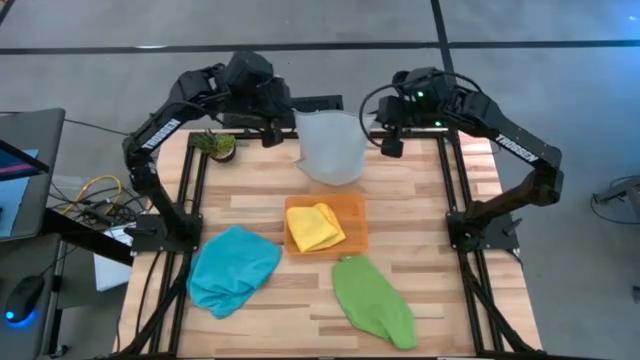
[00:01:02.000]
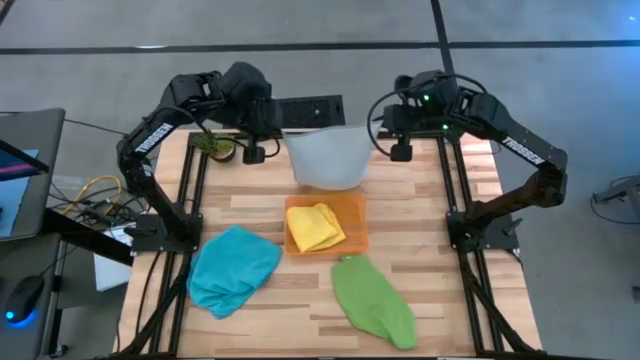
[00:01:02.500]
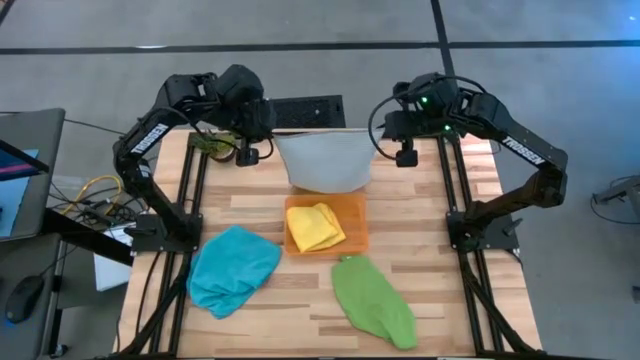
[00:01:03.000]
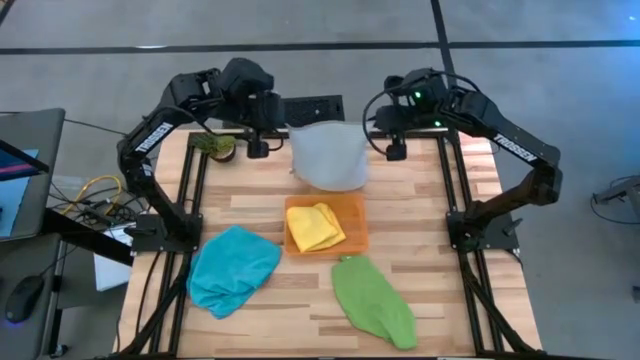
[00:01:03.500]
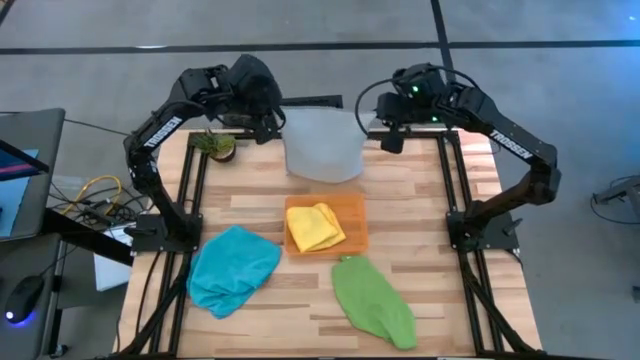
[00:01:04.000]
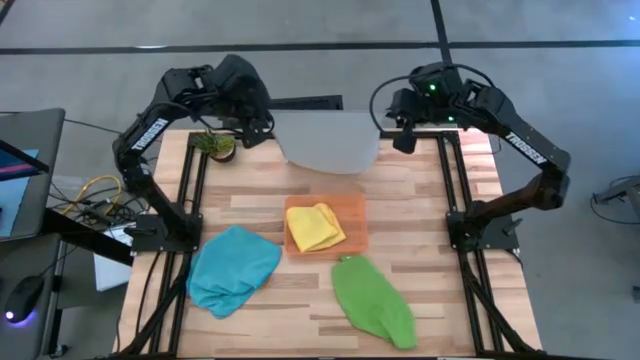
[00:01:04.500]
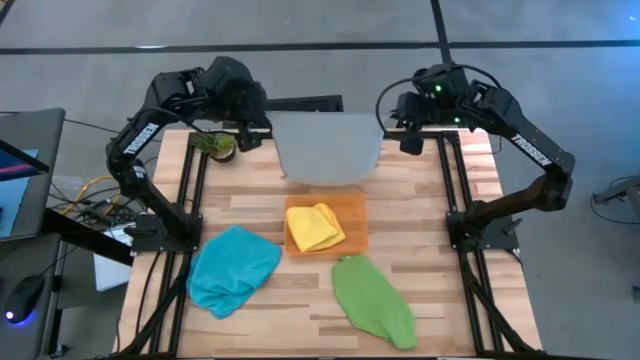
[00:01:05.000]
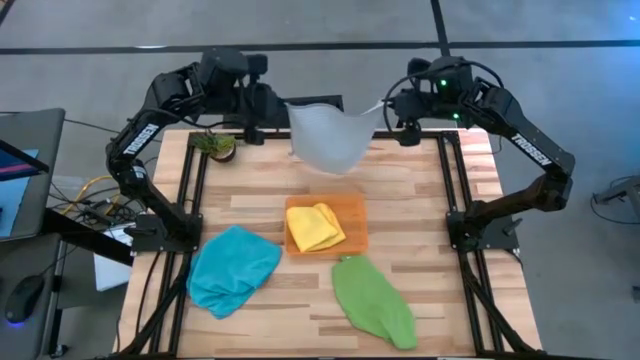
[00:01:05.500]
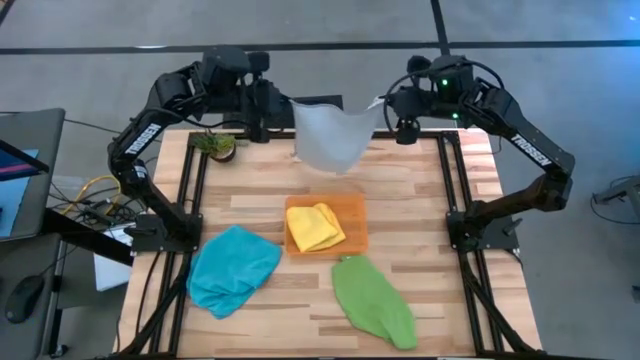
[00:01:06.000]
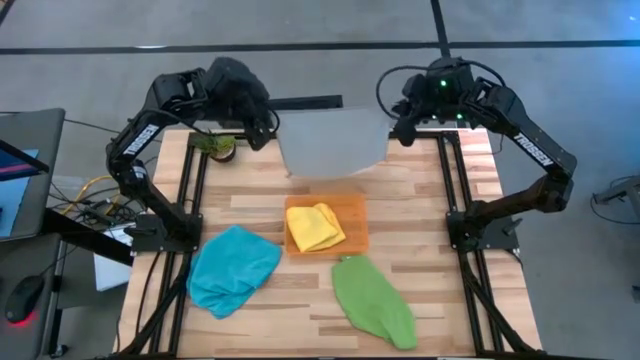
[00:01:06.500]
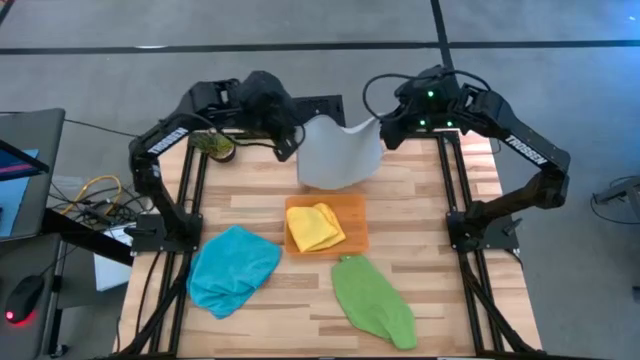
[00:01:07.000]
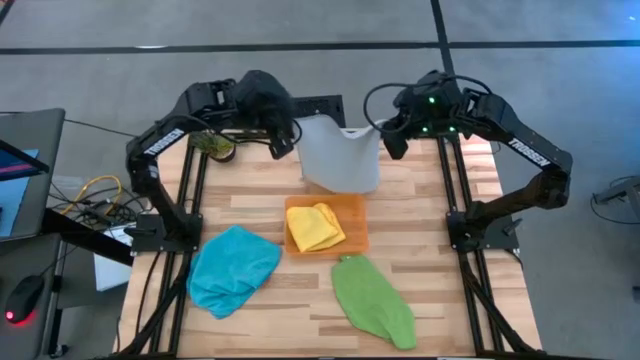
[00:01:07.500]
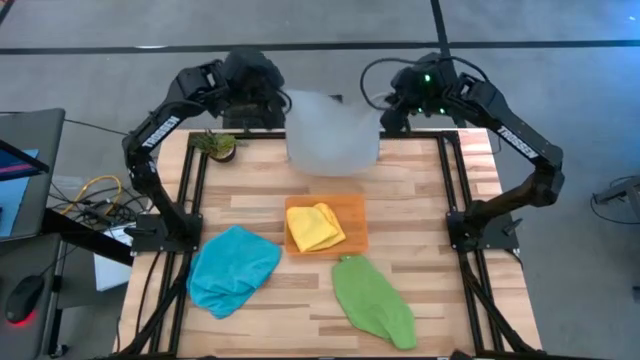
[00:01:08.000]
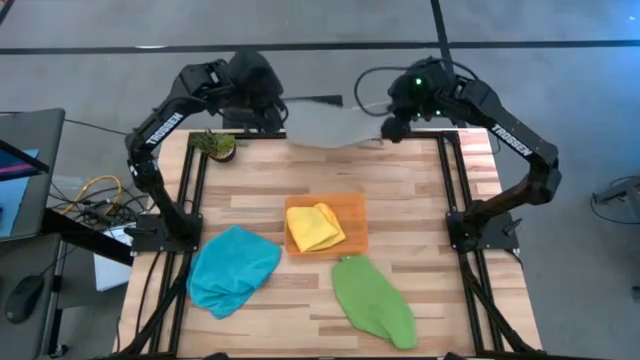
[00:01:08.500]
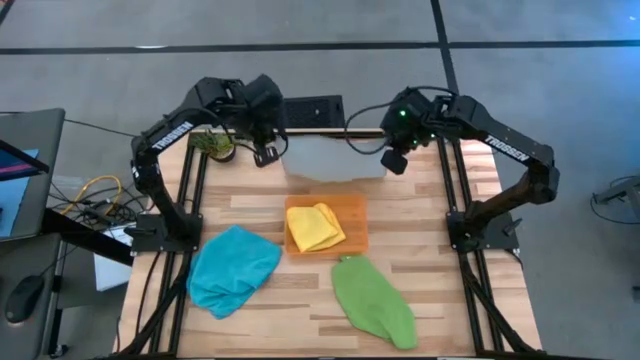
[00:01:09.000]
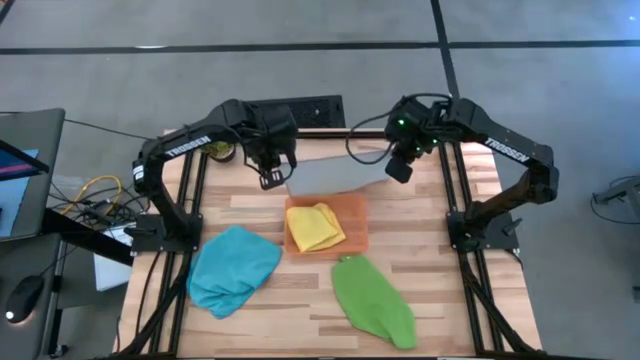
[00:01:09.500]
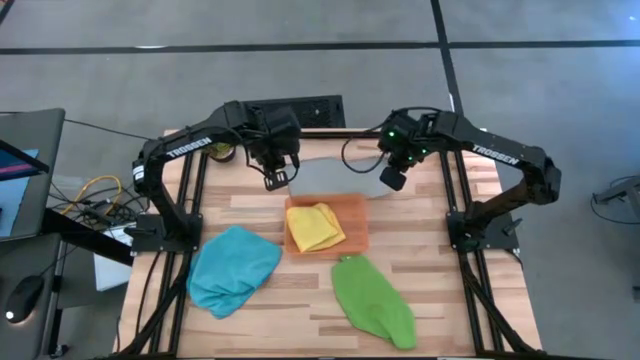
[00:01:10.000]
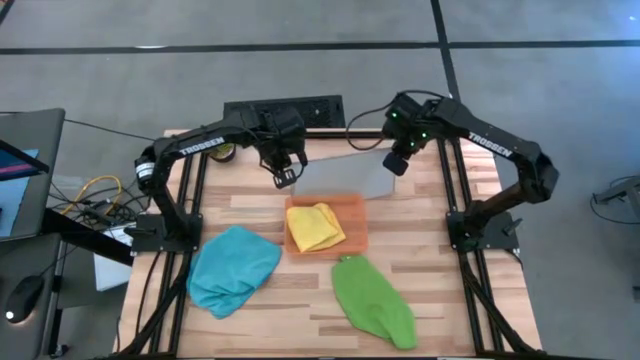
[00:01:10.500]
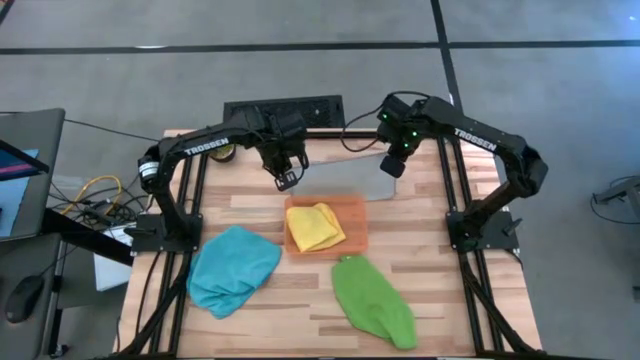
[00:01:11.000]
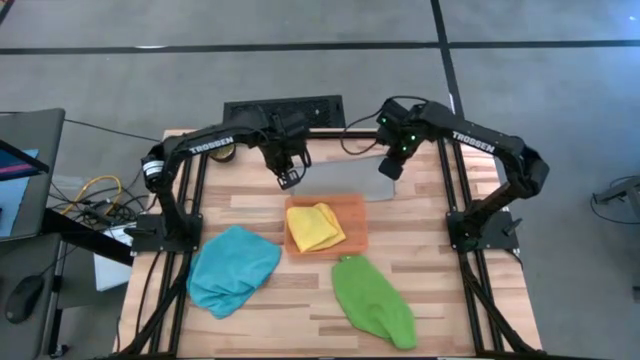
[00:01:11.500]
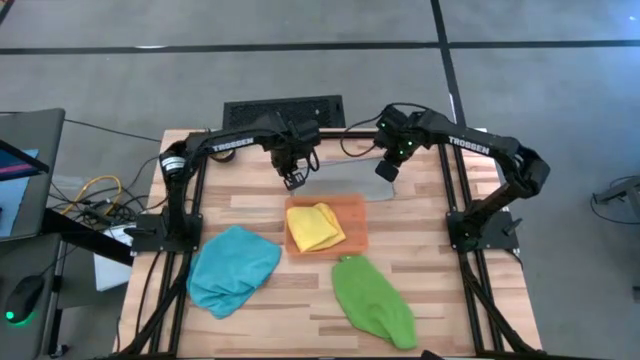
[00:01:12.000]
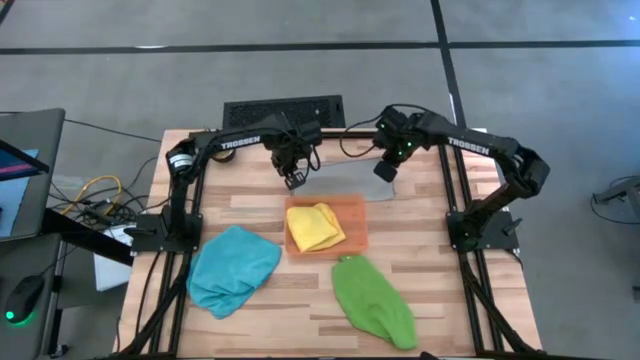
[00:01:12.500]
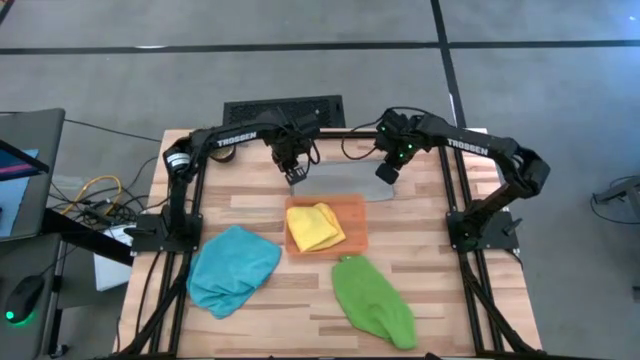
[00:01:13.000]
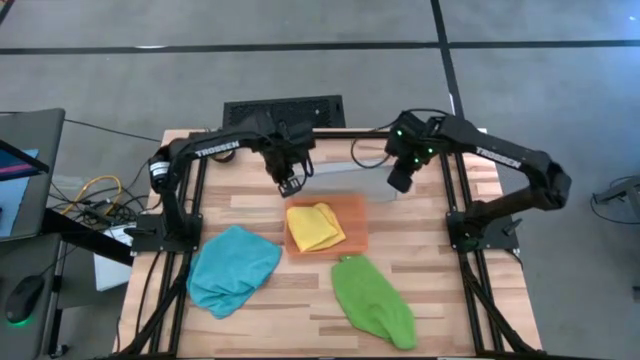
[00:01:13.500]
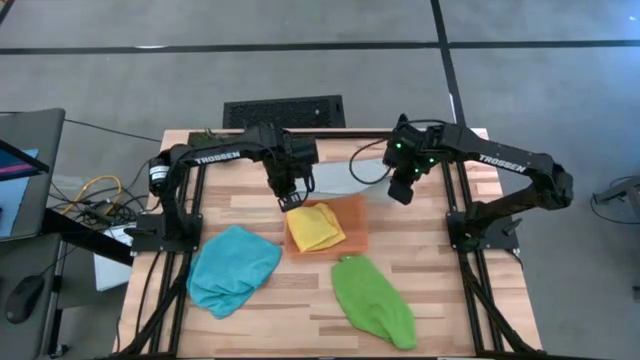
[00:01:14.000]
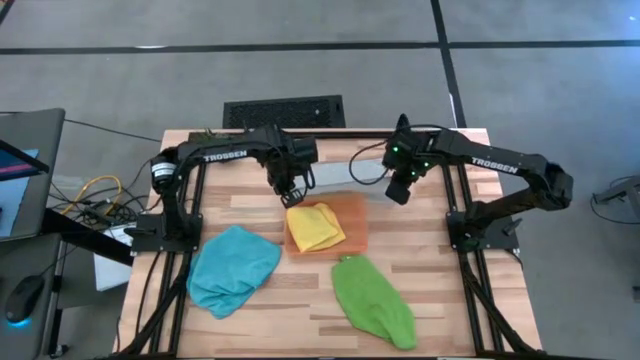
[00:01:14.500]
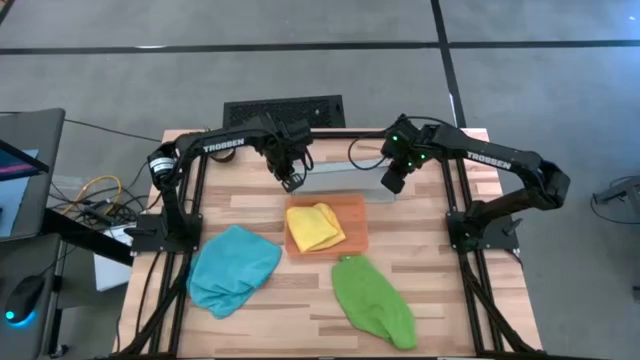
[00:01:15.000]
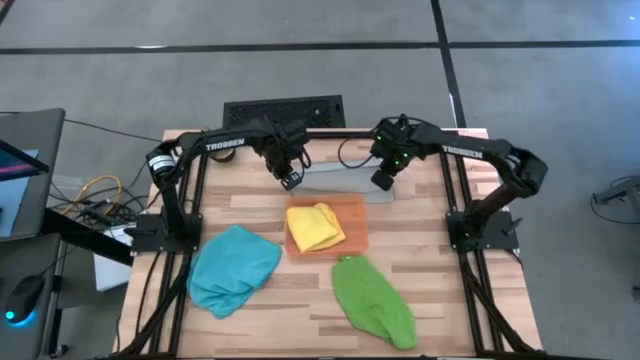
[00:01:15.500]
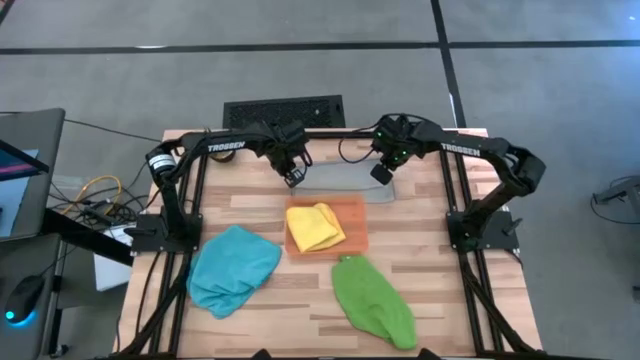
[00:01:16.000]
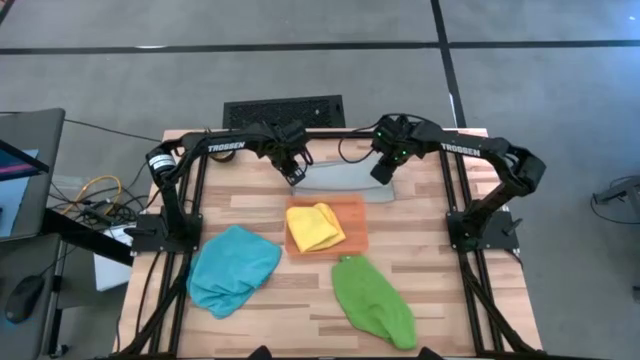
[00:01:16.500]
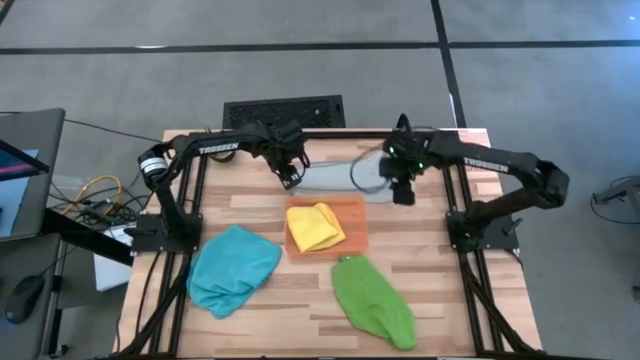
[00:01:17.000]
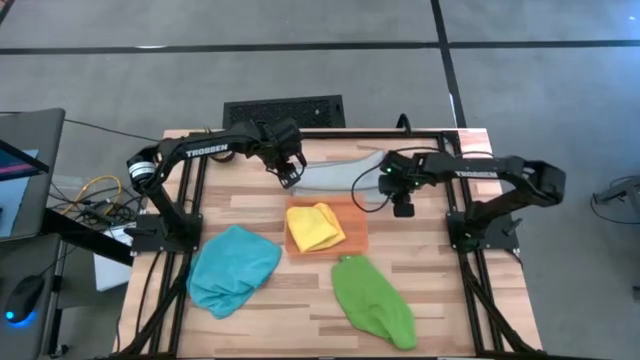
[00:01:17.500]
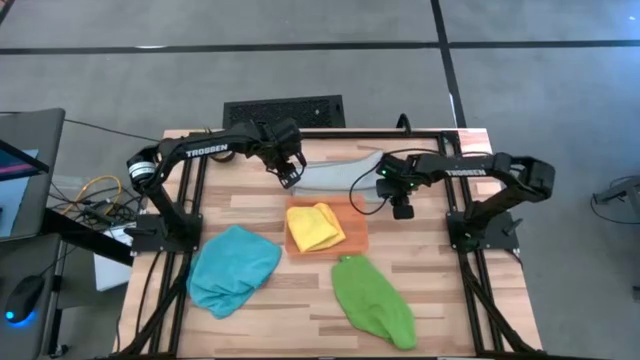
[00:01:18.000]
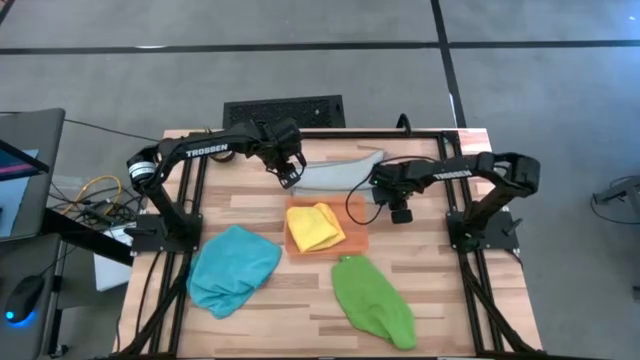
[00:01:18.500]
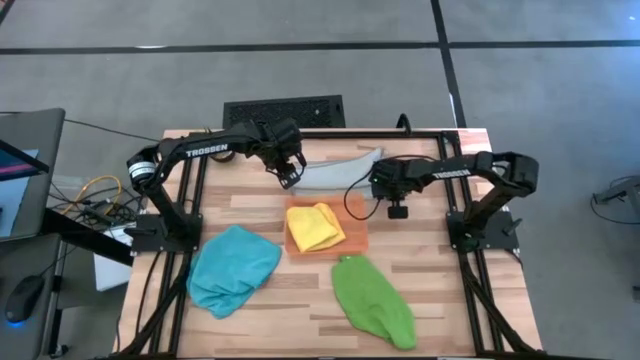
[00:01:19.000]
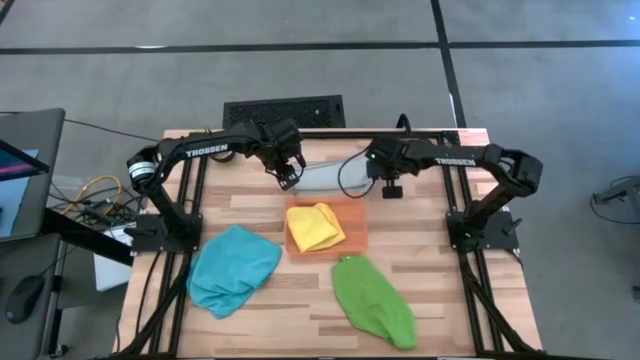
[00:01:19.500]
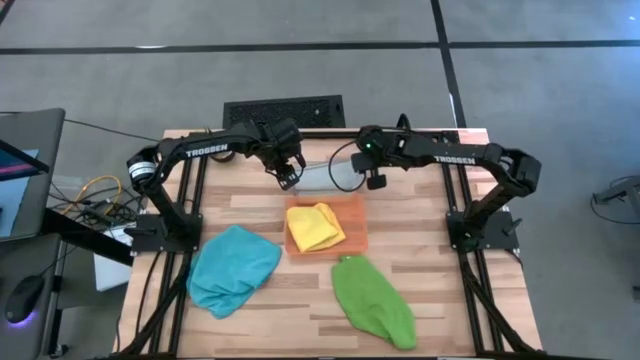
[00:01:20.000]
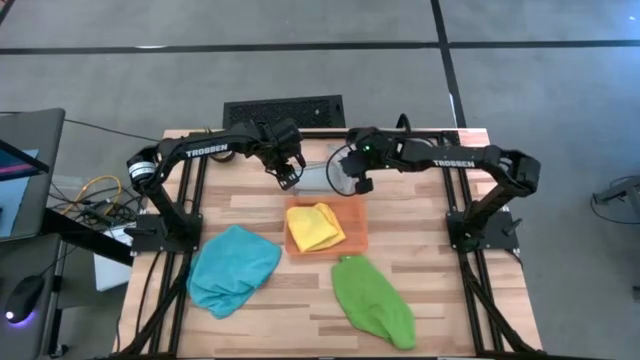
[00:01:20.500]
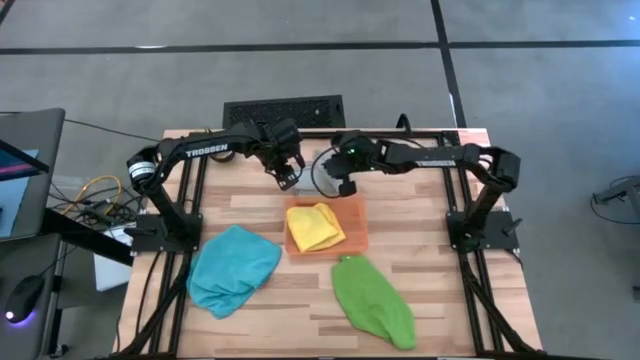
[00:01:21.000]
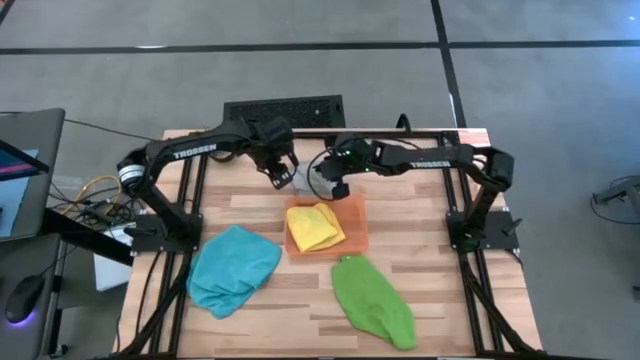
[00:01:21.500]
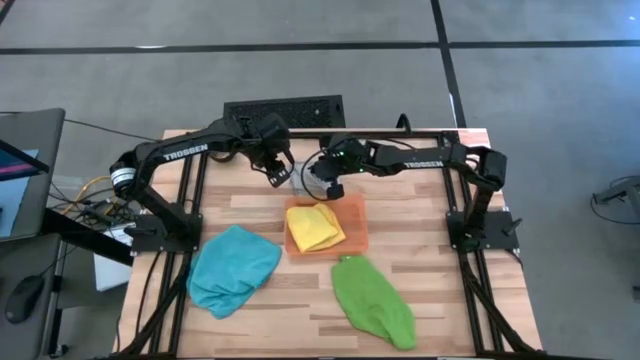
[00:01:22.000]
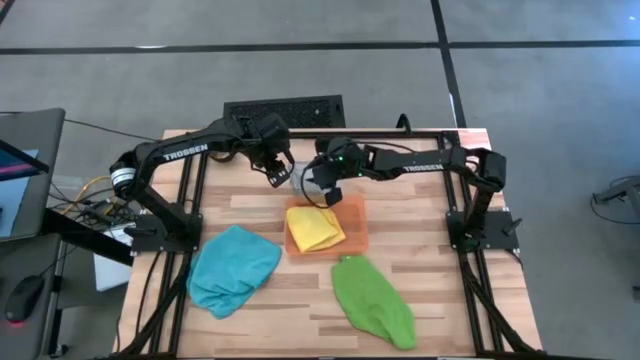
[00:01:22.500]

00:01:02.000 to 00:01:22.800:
Task: Sort microfiber towel by color & place in baskets
Fold the gray towel
